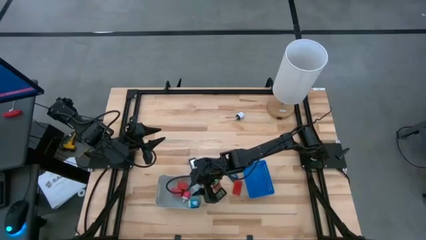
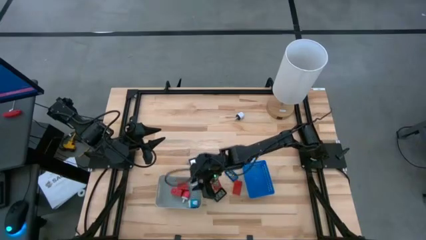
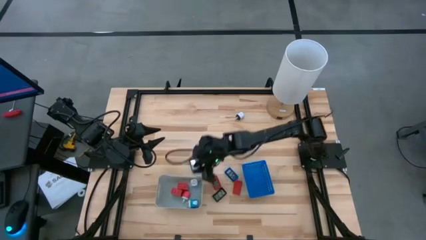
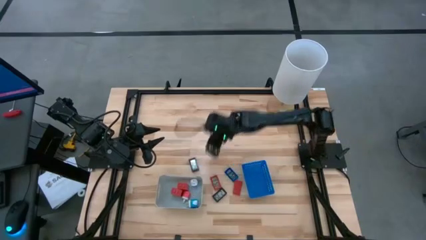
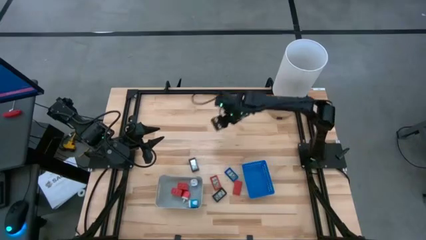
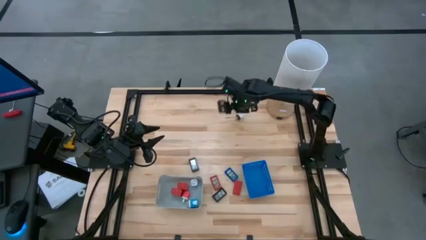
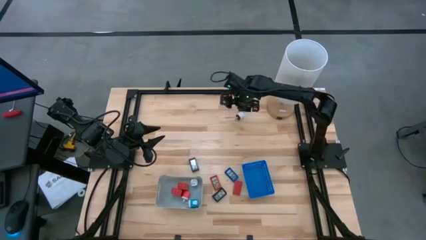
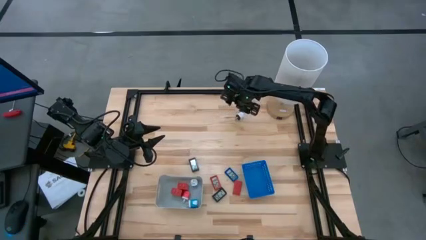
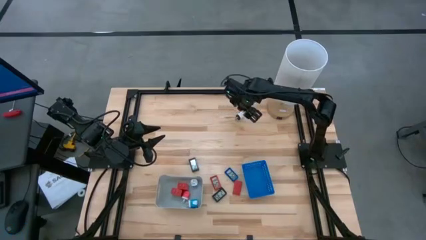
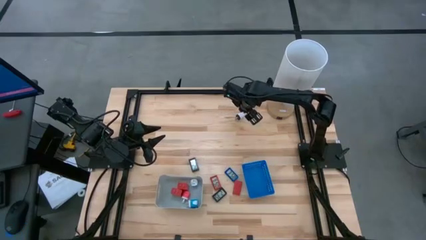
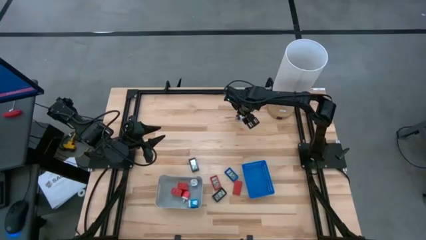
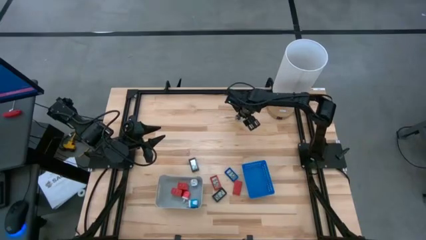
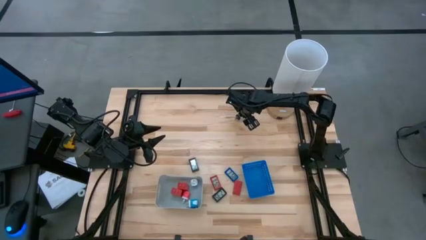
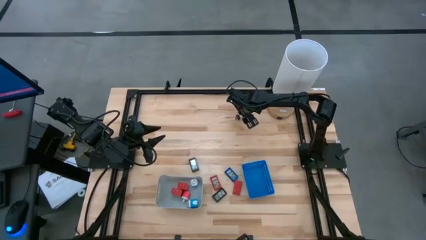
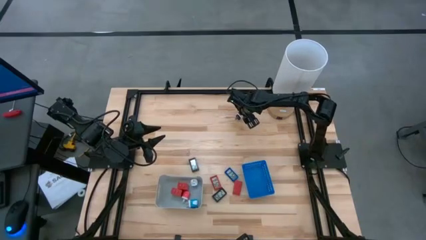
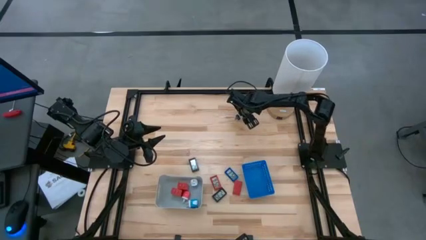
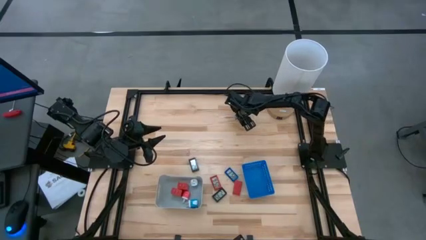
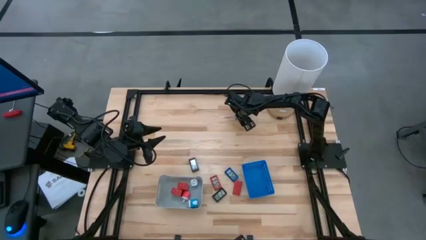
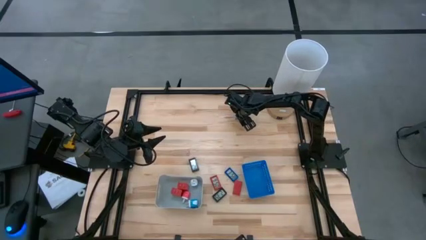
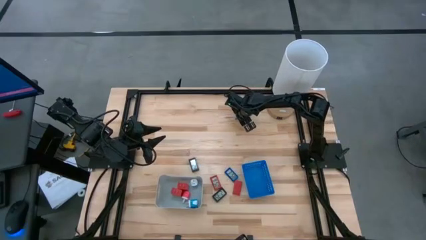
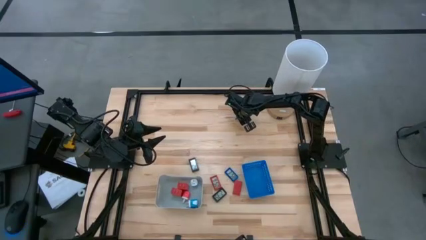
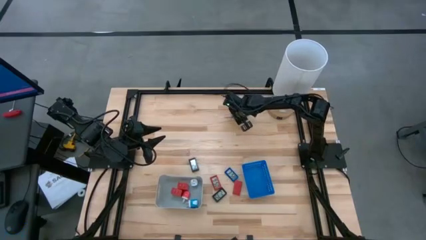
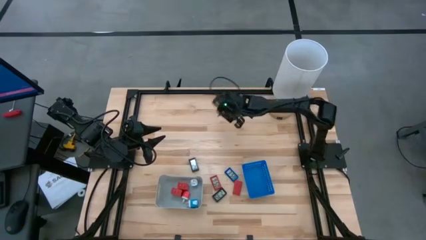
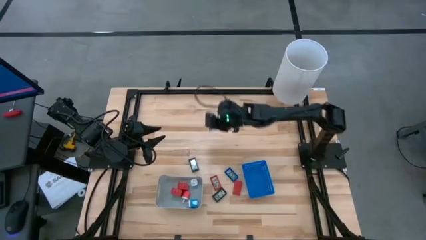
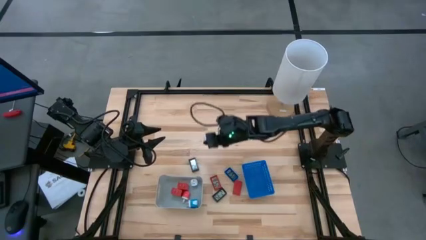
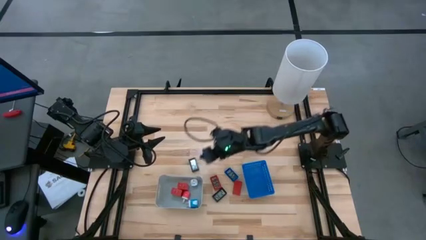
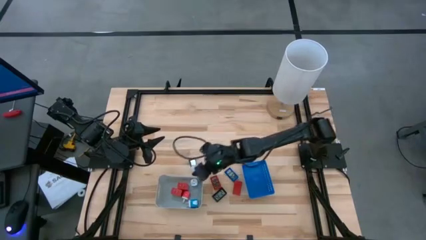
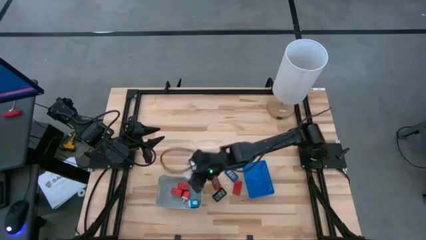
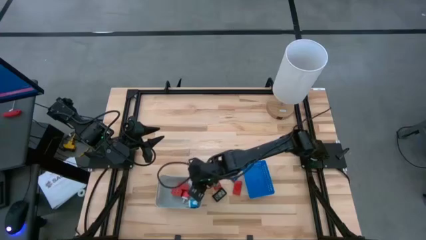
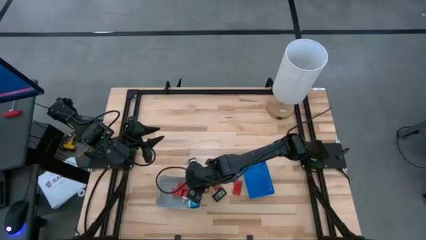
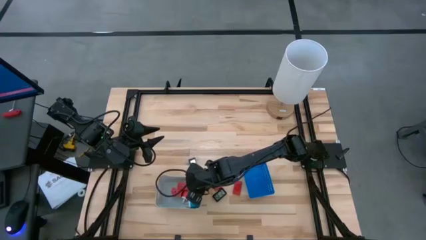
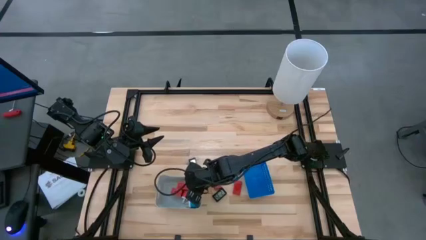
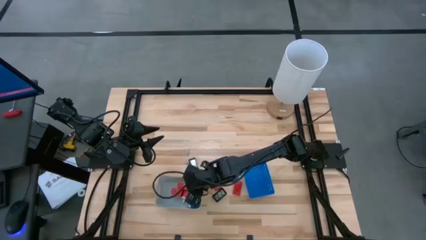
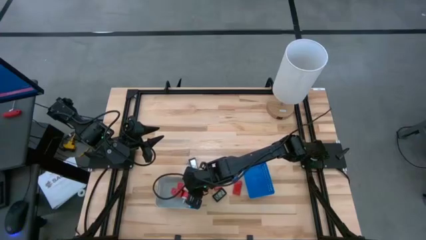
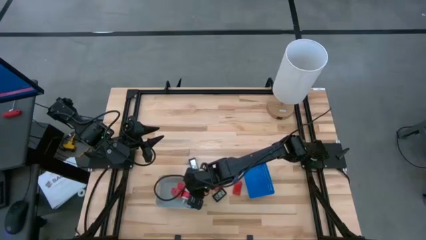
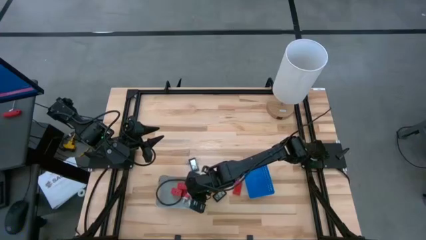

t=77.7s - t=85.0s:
Task: Pick & Place Office items
Put the white charger adapter into the gray bin

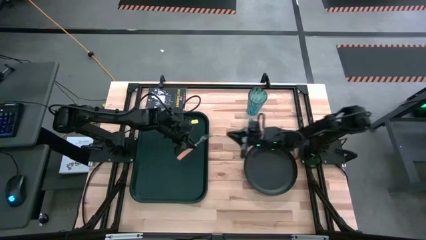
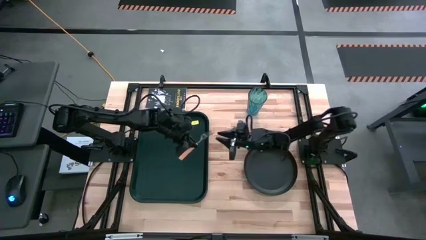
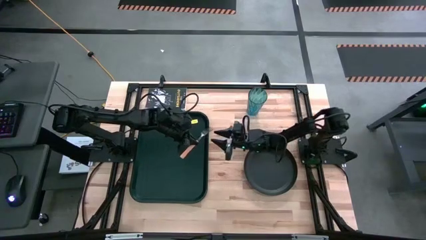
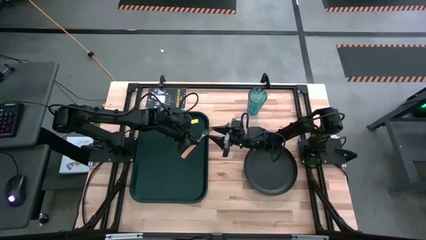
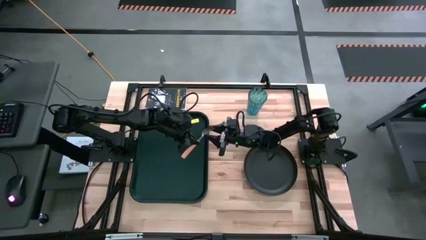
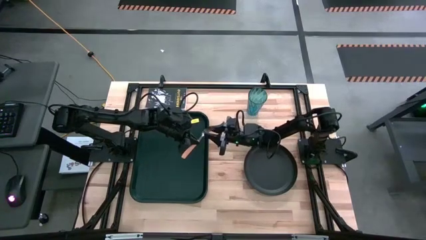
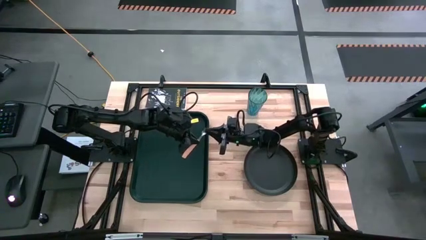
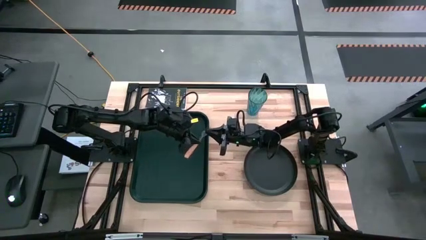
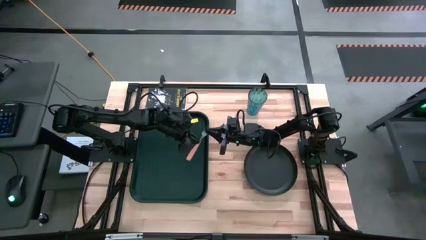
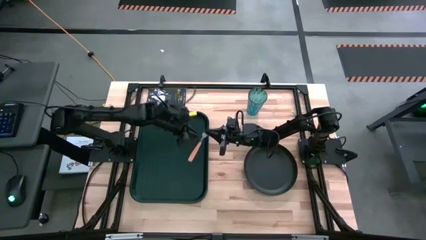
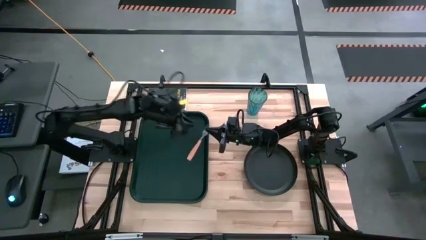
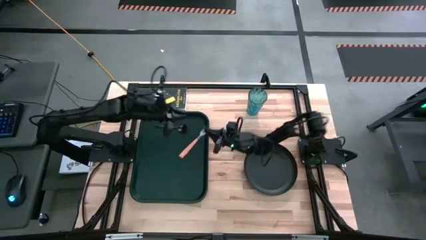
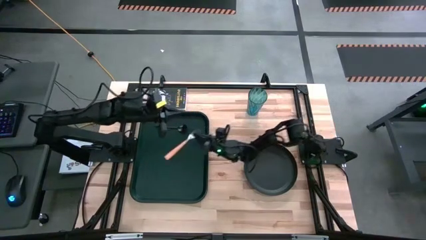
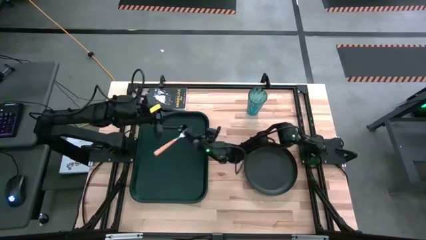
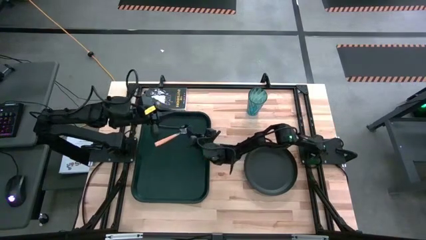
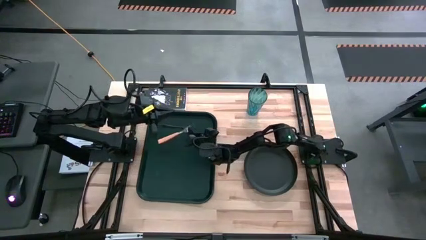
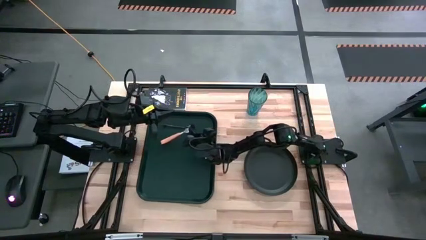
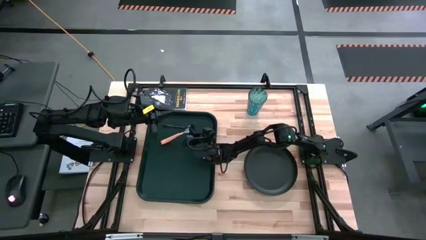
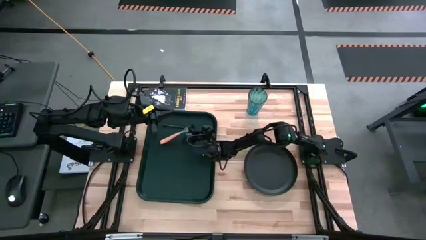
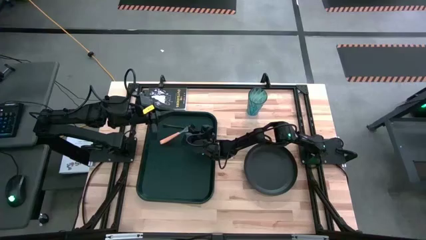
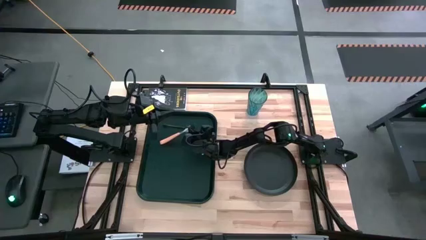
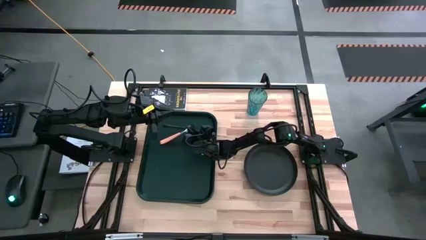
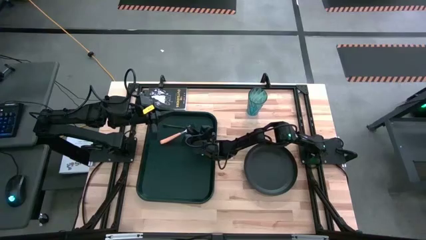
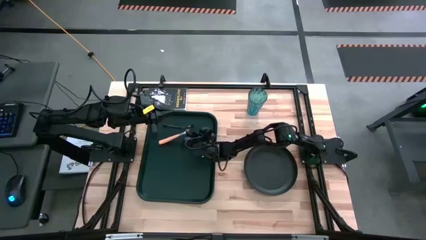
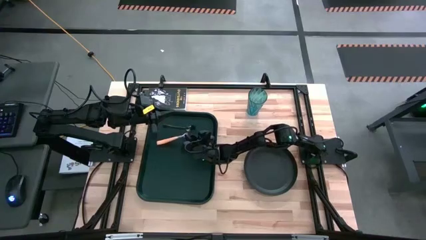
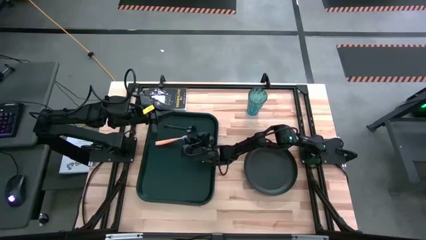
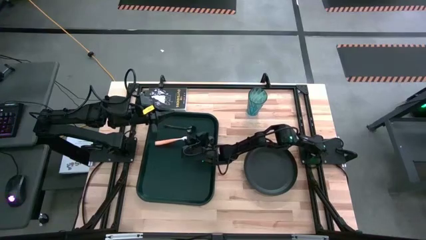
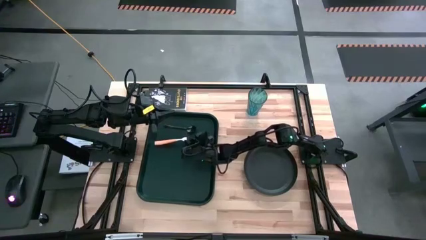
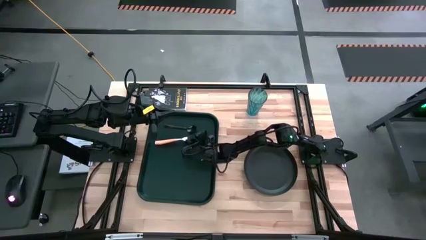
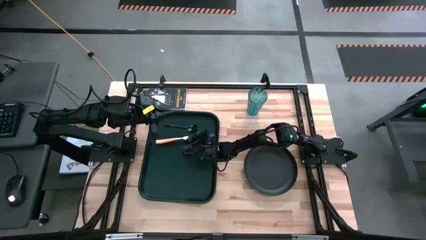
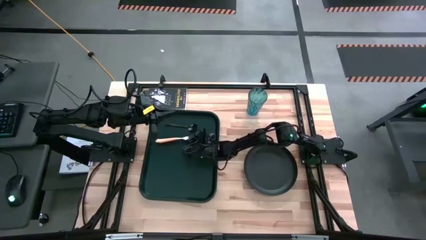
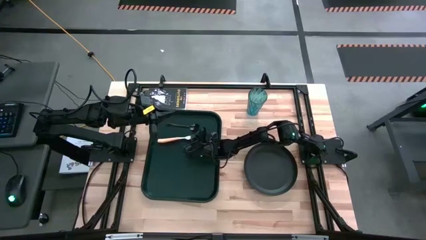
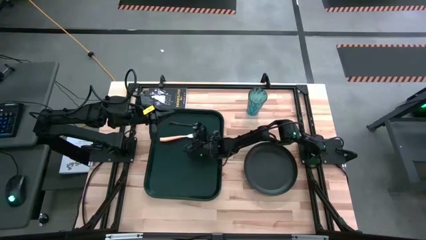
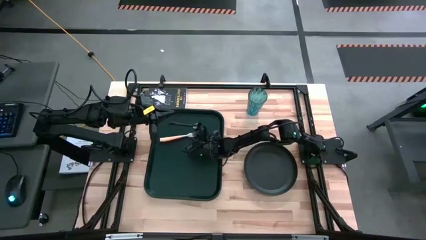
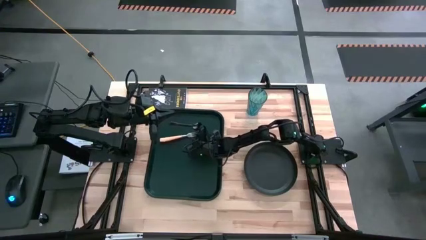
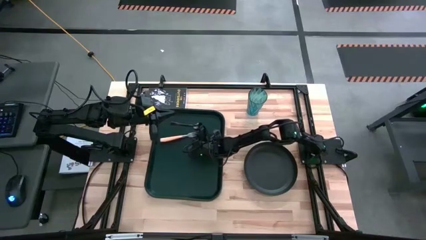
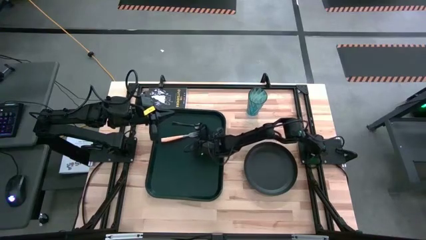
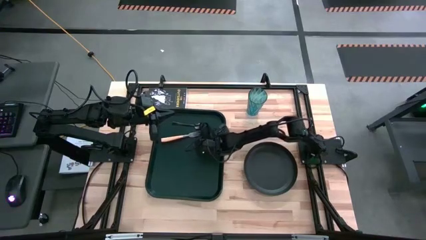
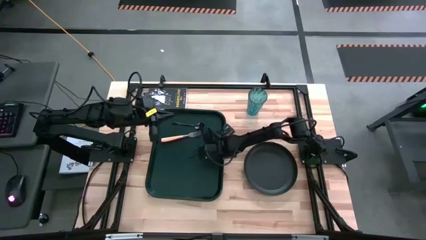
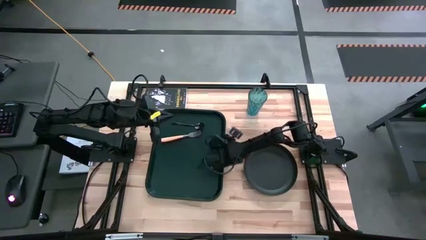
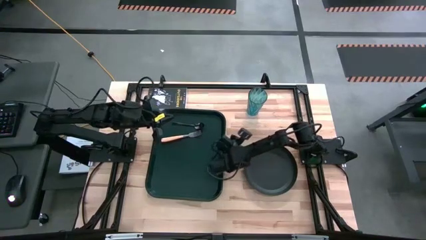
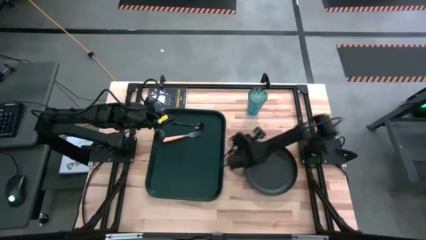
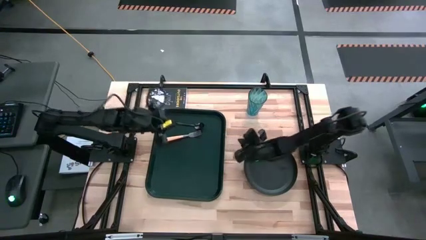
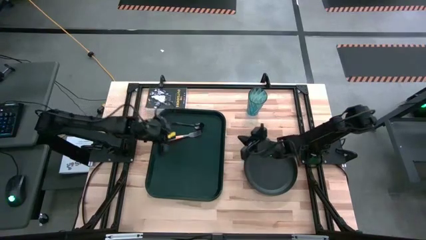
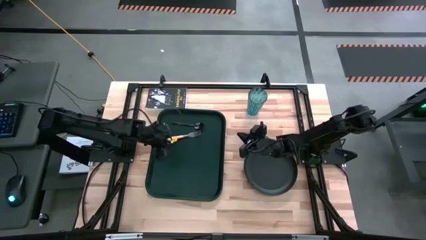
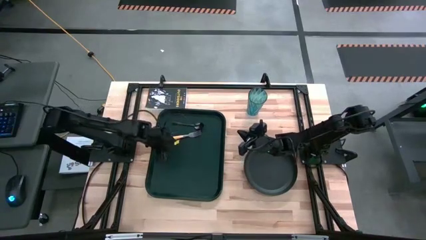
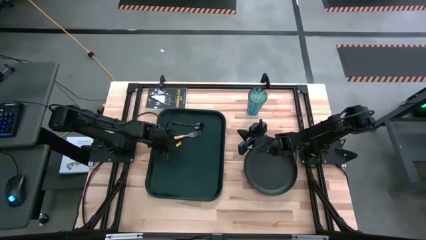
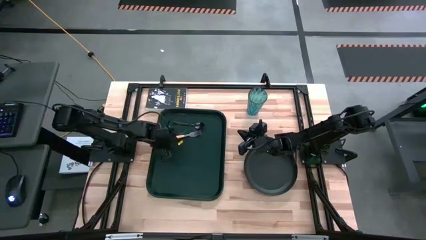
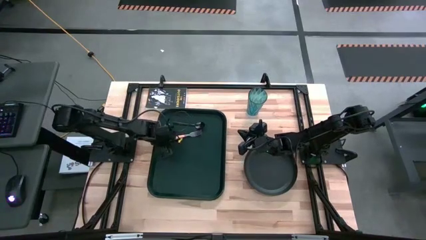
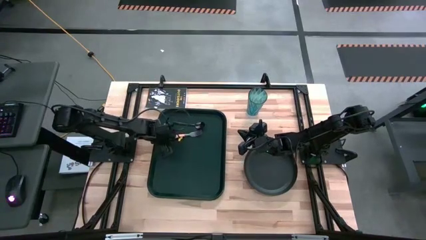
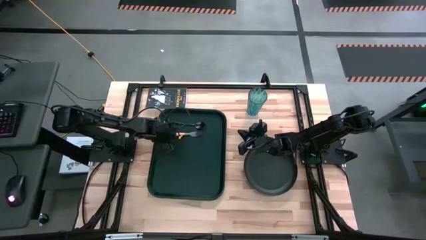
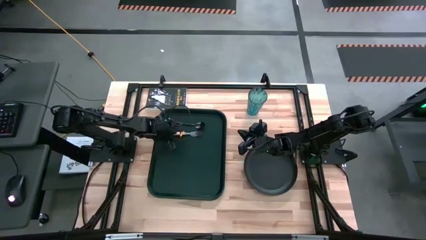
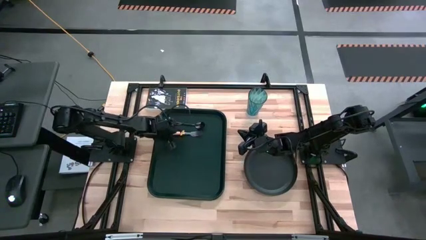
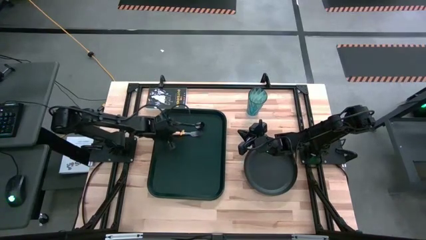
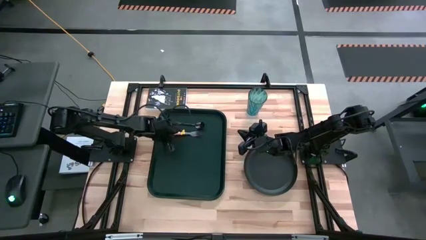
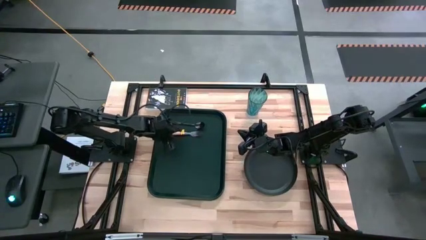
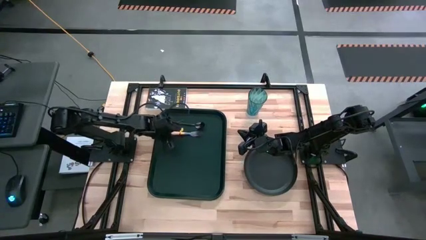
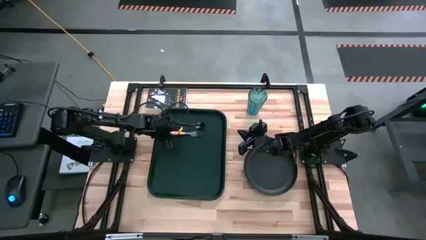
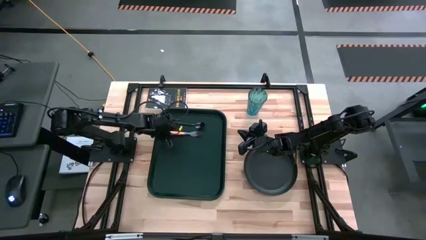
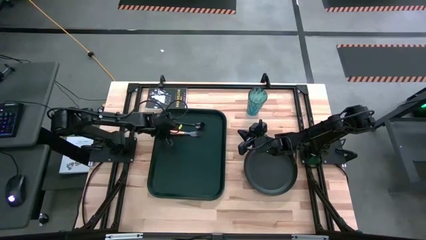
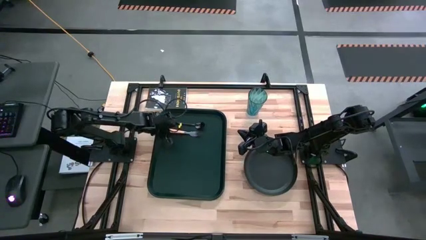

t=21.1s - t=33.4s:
Task: Pick and place plate/cup/fork/spoon on tray
Put the fork on the tray to the right side of the spoon
